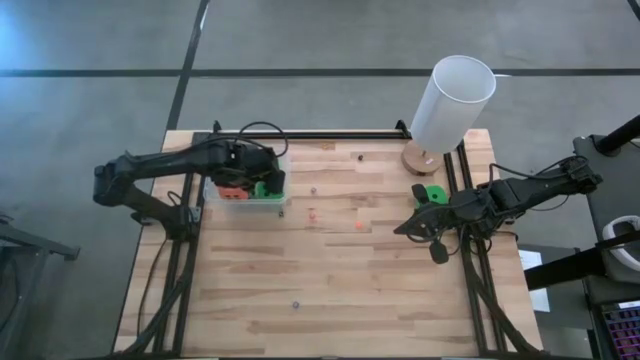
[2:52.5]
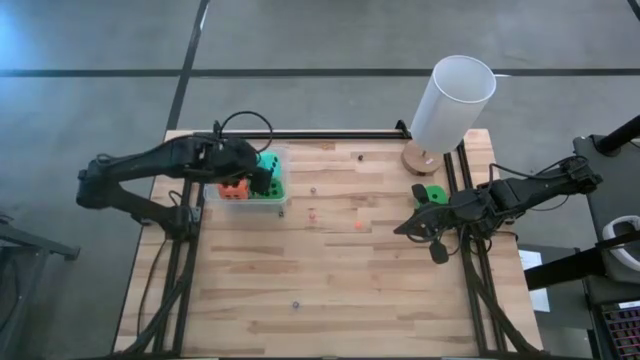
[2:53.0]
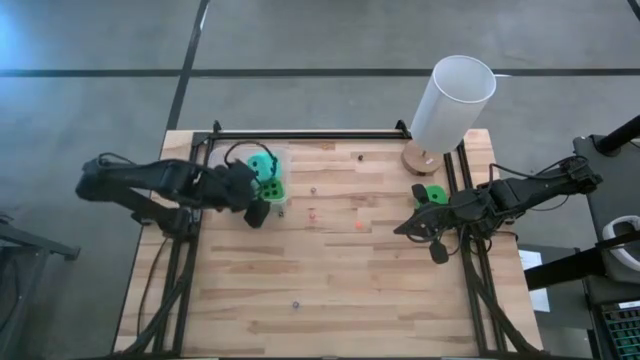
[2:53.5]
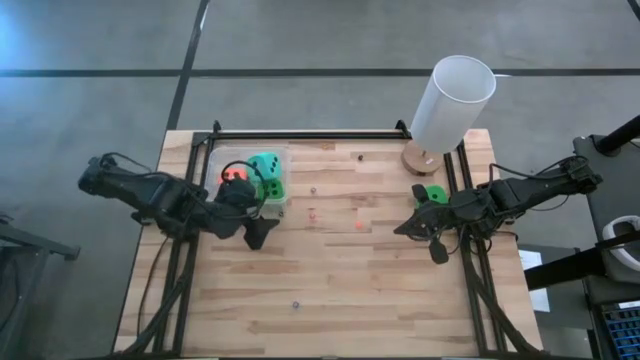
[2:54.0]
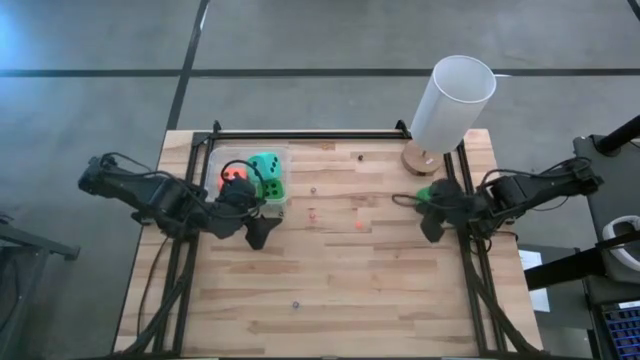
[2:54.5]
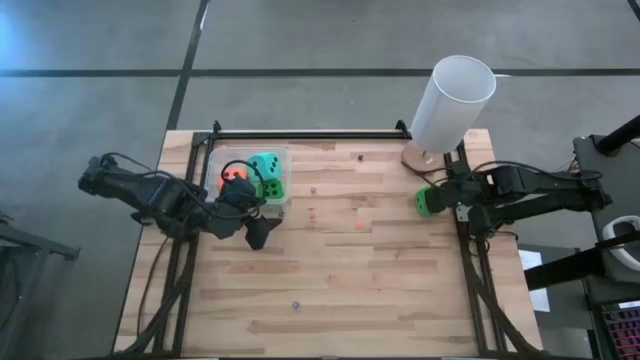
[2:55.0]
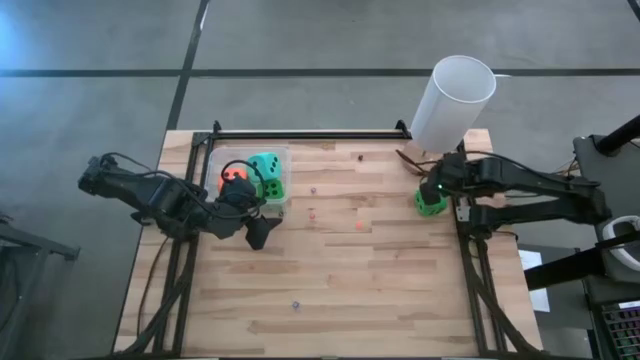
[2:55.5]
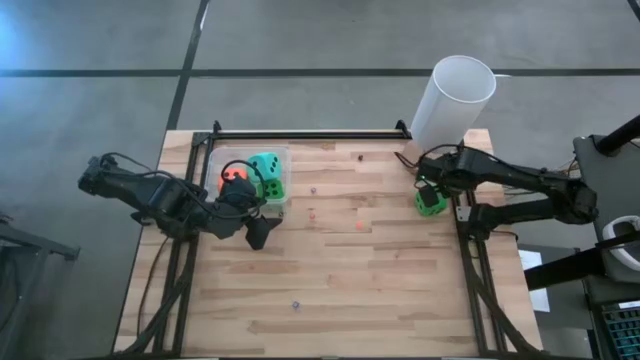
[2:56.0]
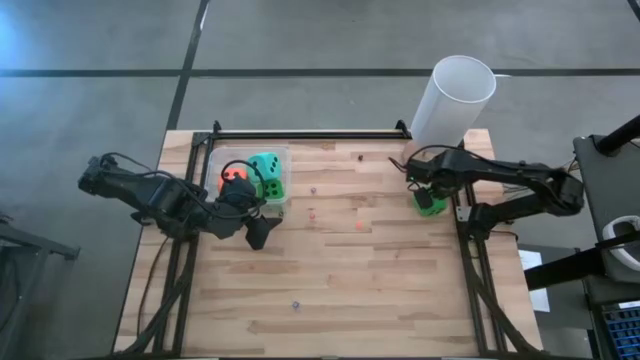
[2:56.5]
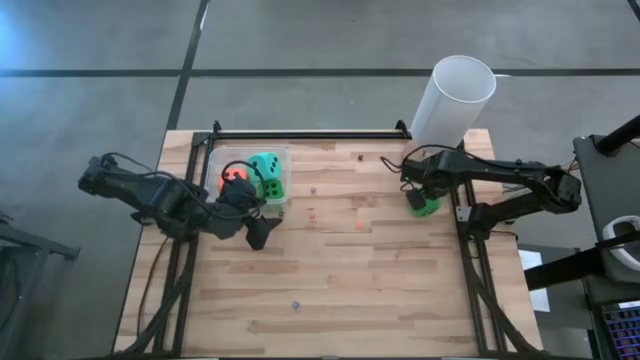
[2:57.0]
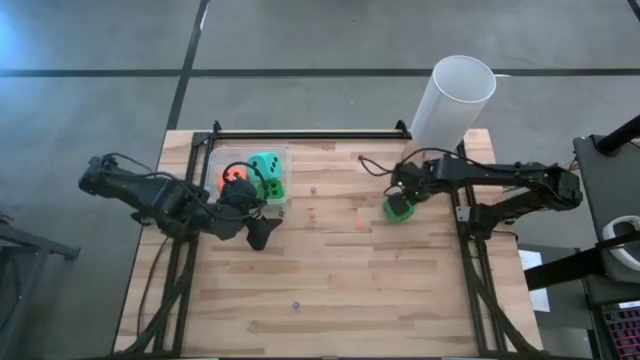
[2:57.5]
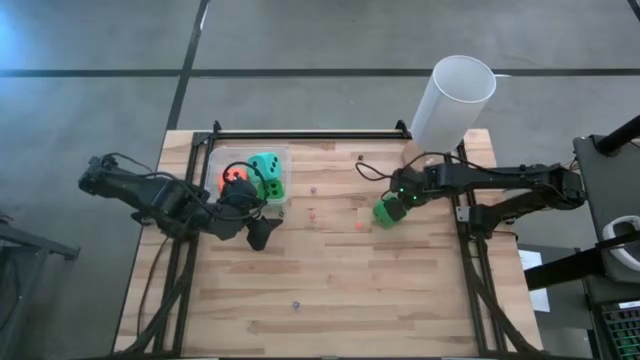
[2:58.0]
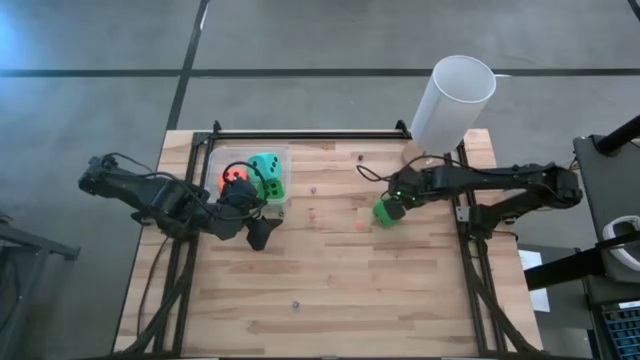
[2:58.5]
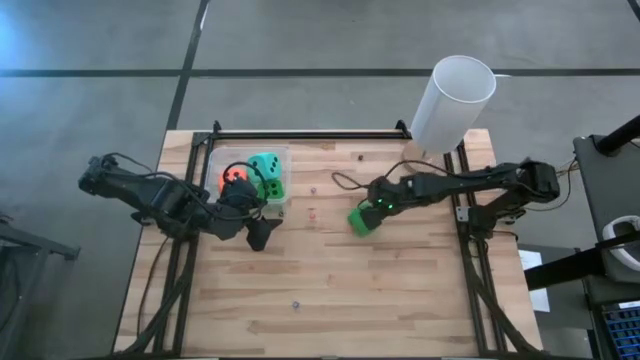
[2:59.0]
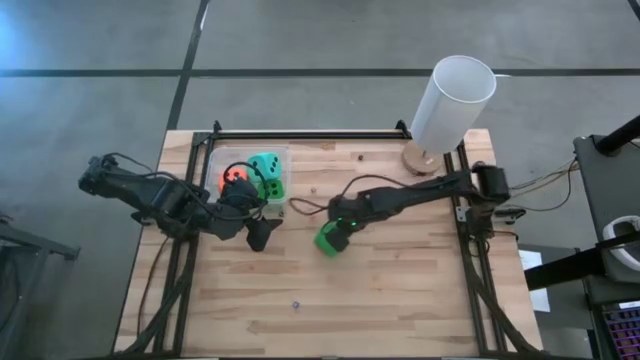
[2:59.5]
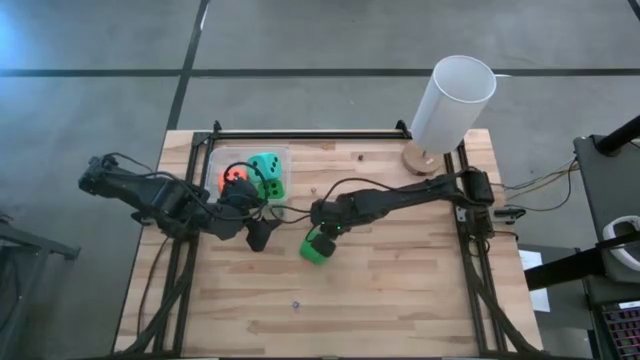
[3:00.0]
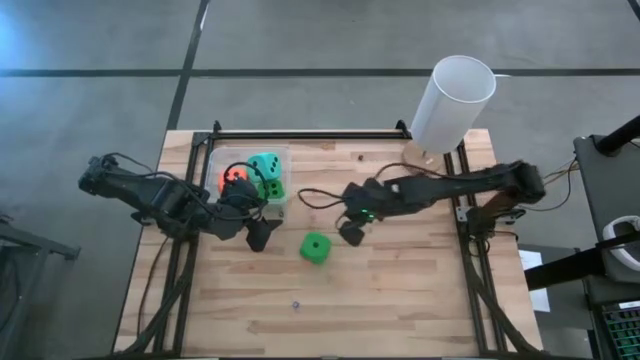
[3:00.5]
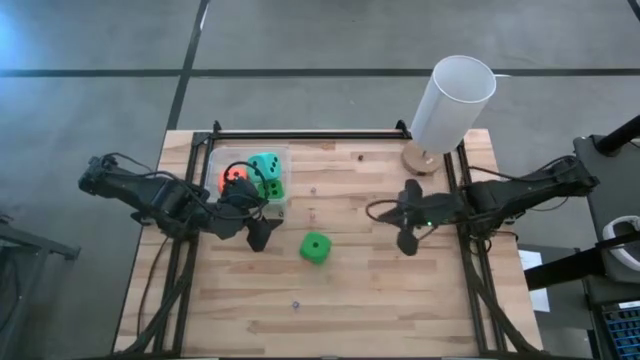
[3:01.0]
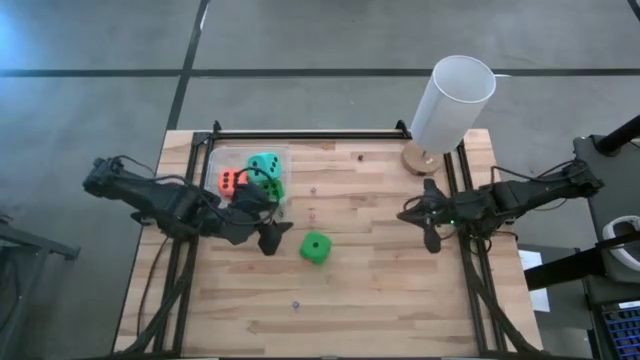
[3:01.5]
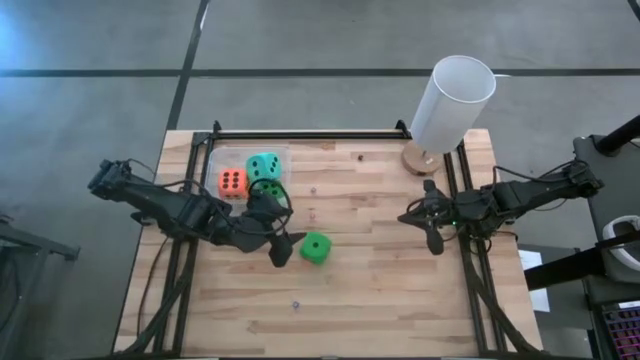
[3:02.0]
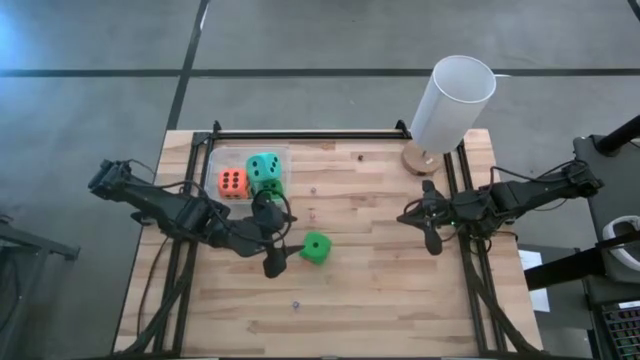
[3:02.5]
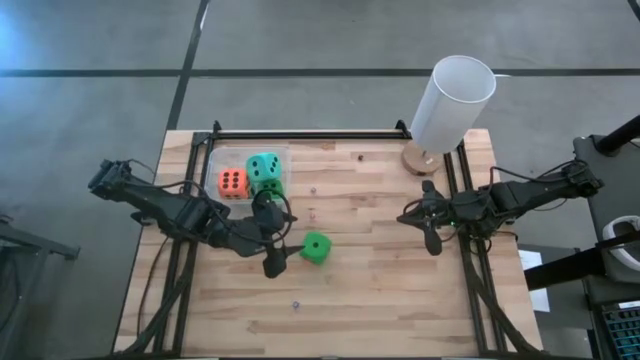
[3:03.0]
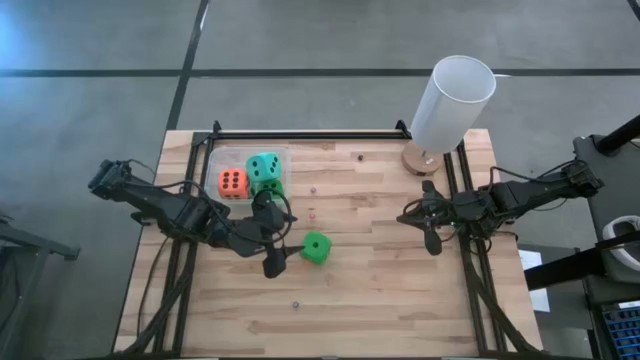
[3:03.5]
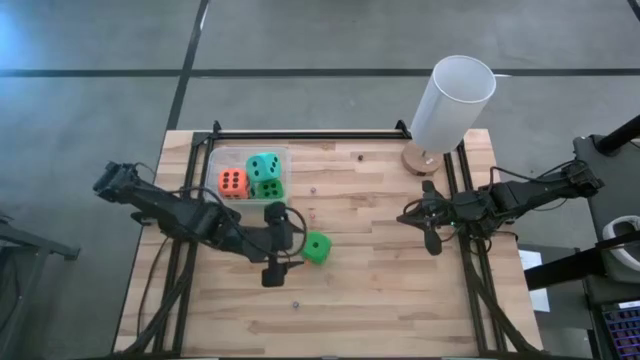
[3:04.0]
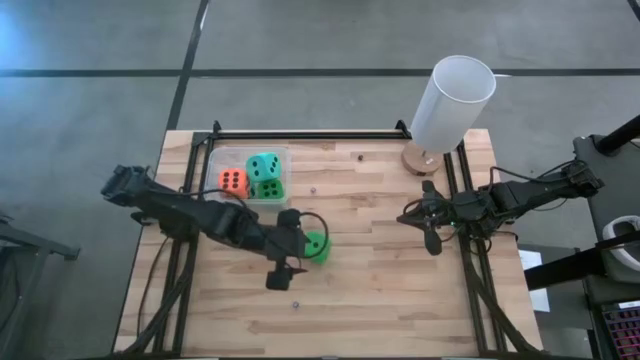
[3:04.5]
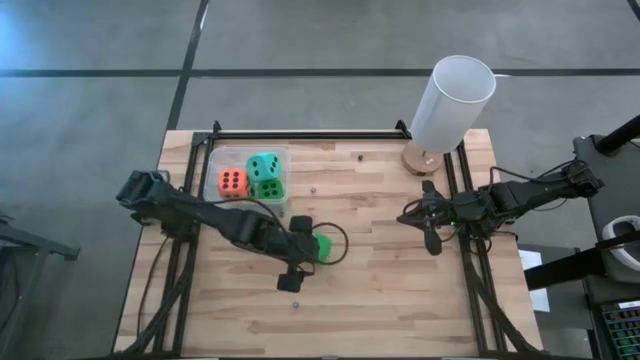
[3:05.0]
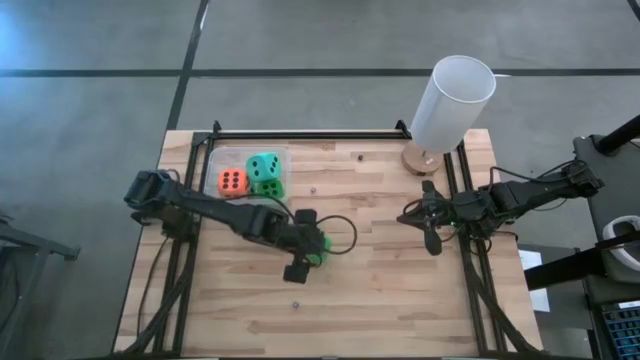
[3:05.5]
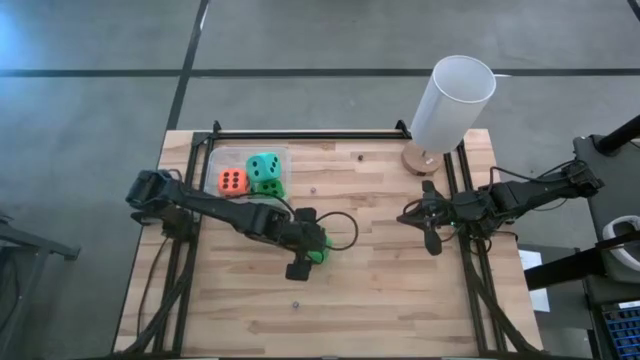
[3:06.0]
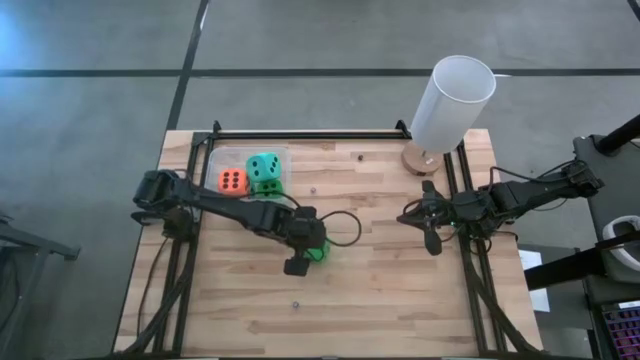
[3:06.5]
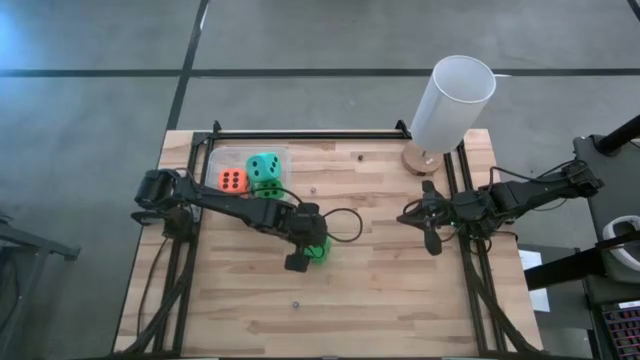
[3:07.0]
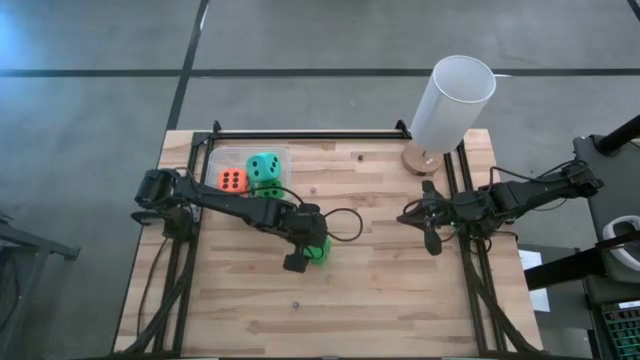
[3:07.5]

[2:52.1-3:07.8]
Task: Pick & Place Dice
Put the green large dice into the transparent bin

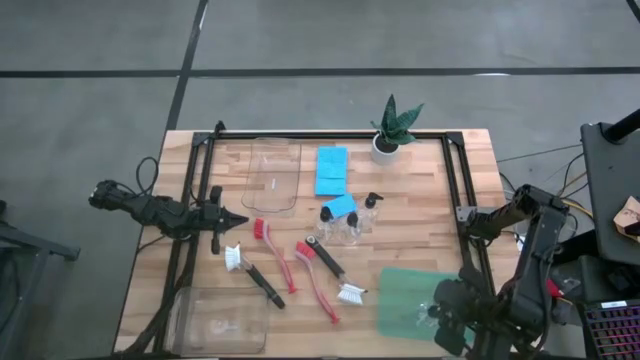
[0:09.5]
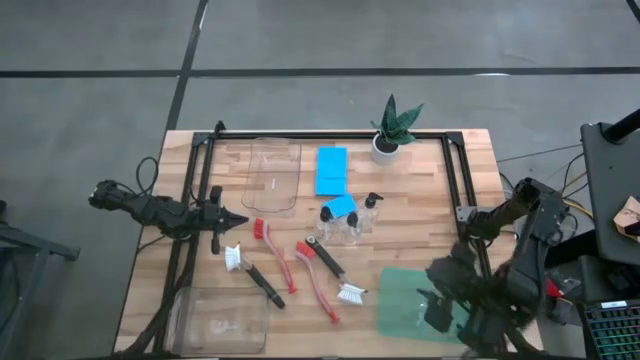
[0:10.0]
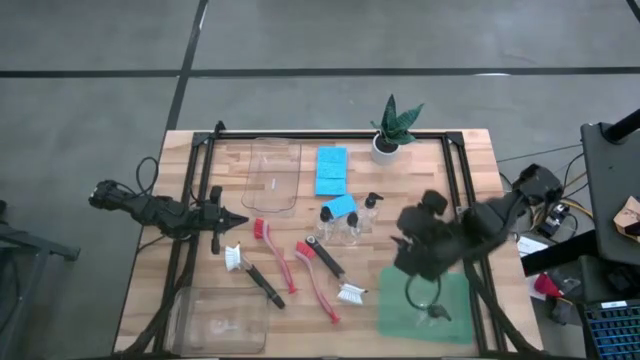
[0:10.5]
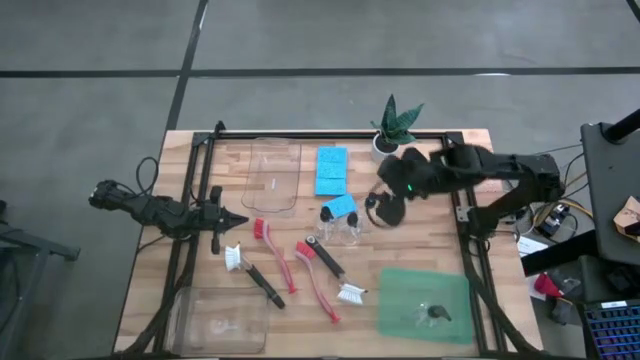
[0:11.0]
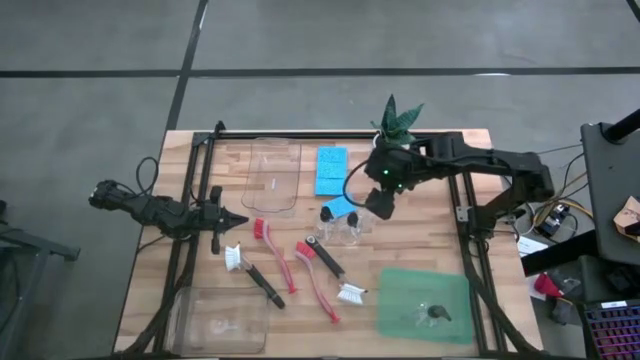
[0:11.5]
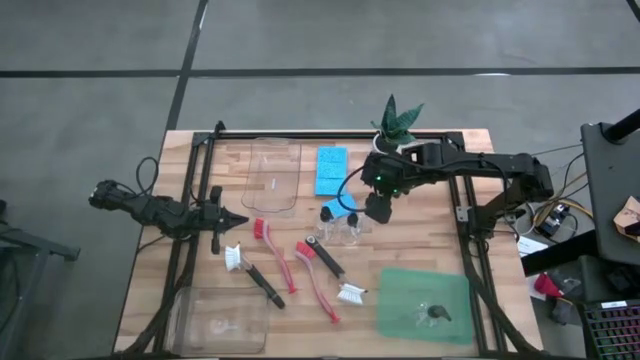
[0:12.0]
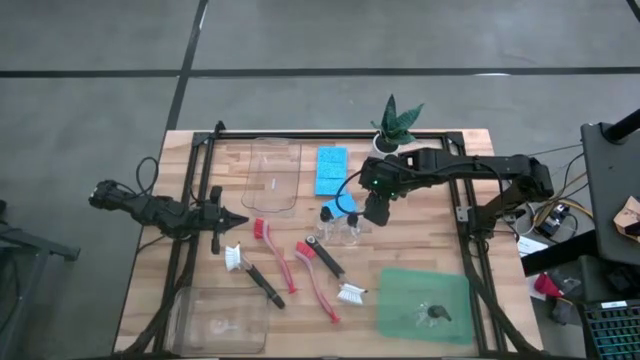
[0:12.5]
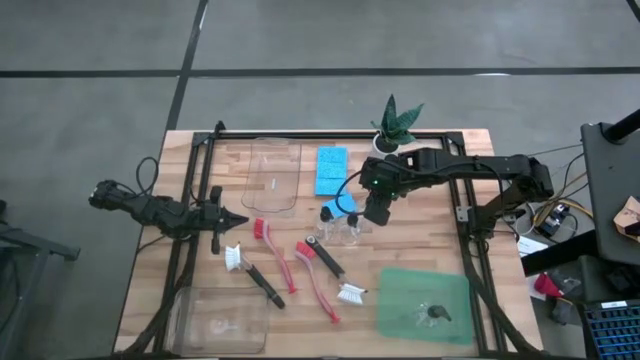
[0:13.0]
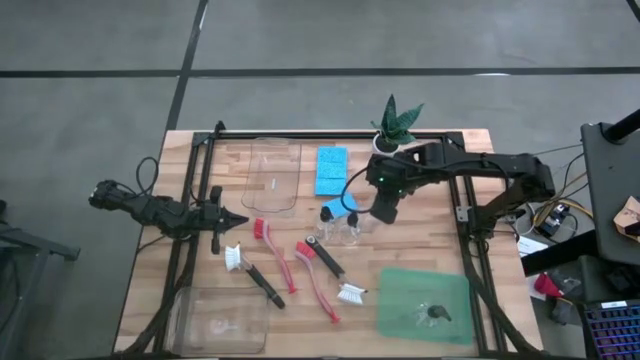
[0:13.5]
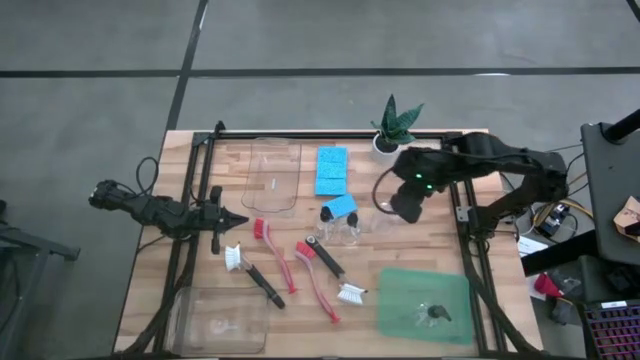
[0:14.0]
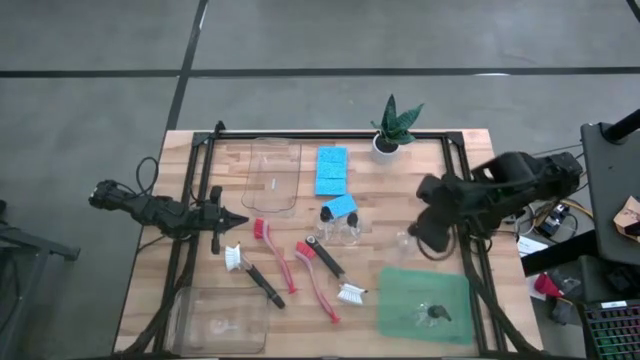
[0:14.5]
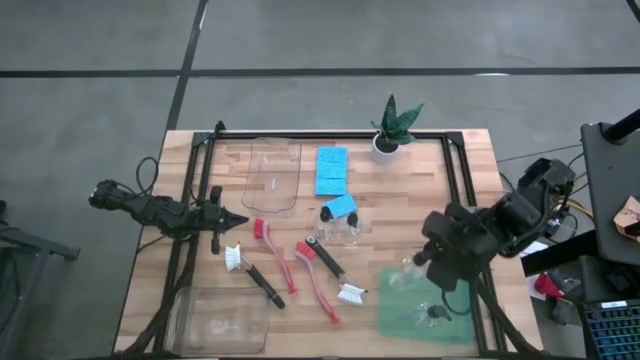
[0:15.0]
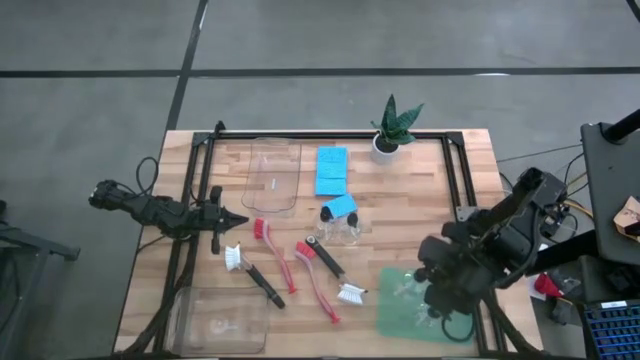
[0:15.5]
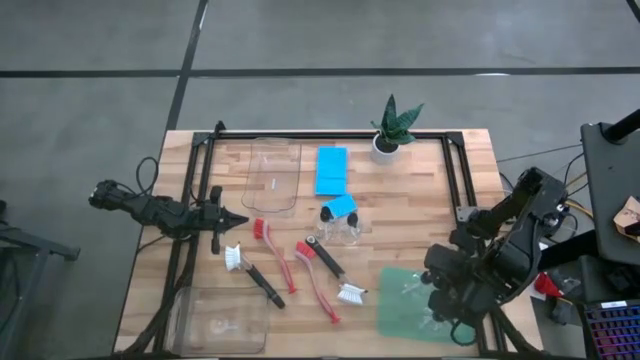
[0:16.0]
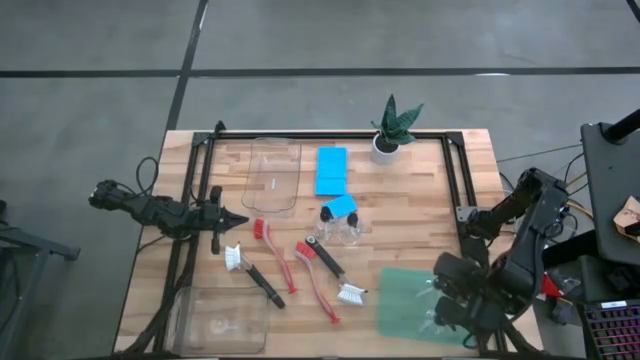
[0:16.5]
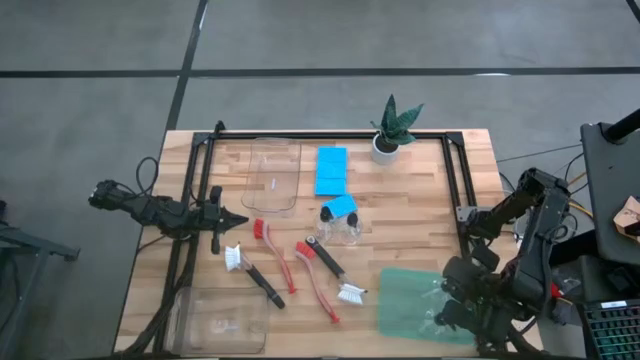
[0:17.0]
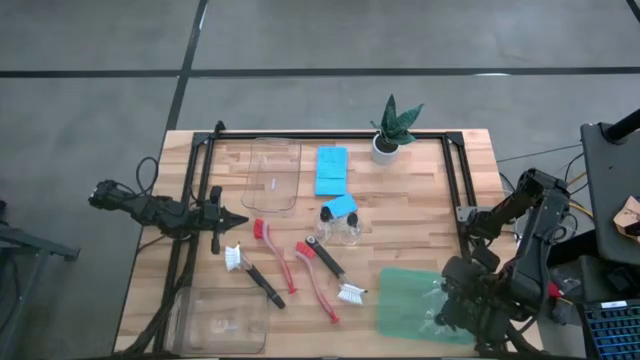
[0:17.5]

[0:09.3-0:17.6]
Task: Pick & Place Kitchen Sink Supplies
Put the sprayer bottle into the green bin
